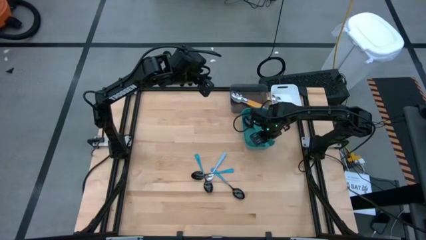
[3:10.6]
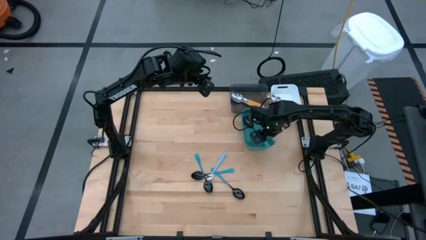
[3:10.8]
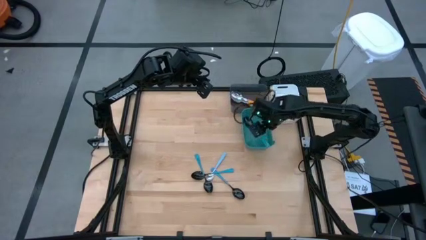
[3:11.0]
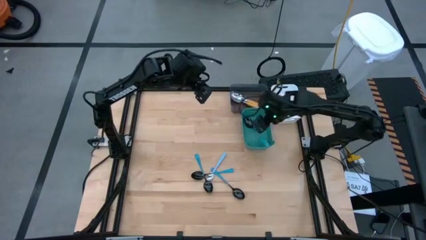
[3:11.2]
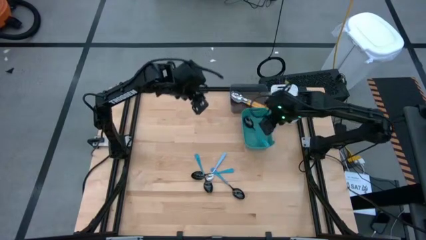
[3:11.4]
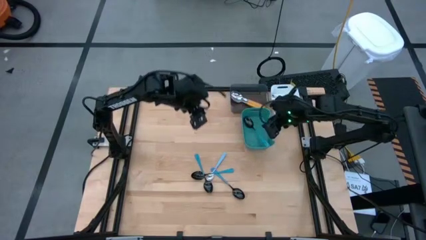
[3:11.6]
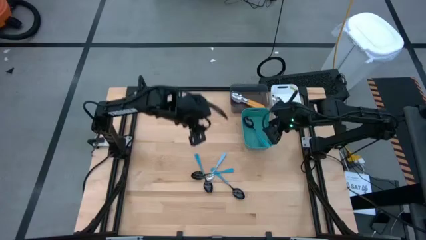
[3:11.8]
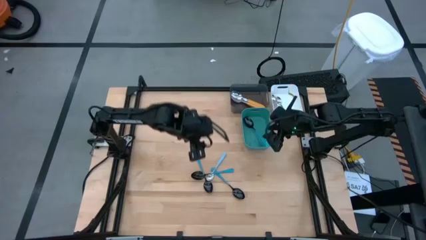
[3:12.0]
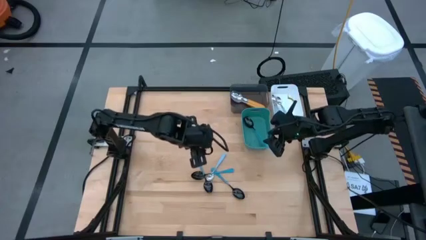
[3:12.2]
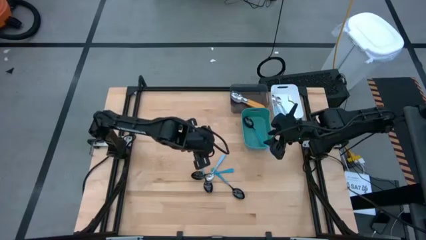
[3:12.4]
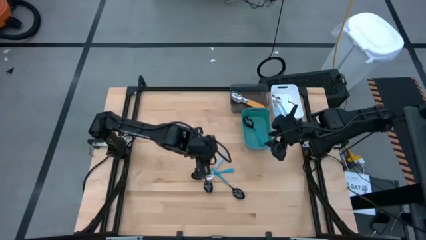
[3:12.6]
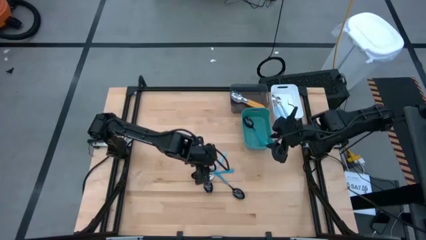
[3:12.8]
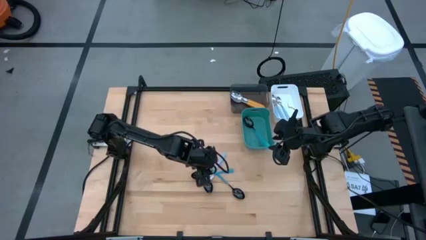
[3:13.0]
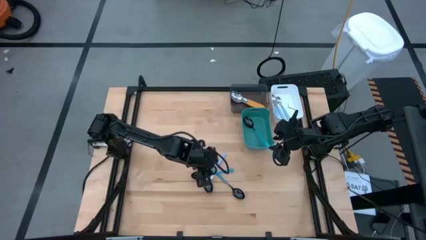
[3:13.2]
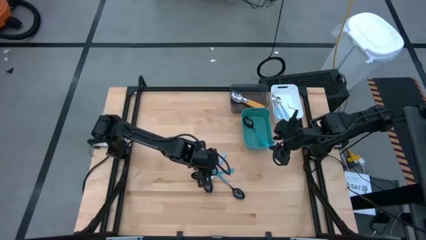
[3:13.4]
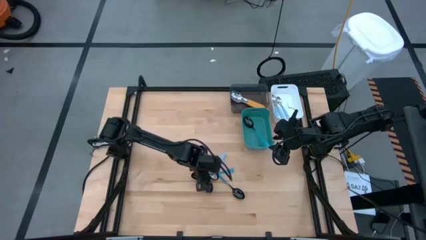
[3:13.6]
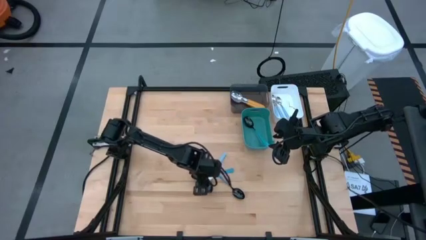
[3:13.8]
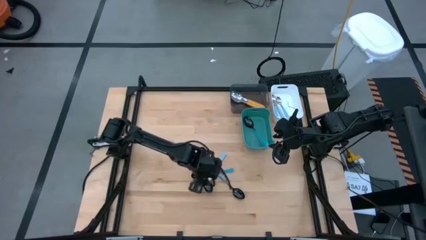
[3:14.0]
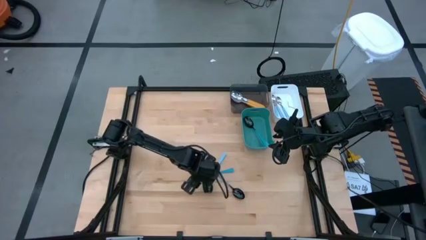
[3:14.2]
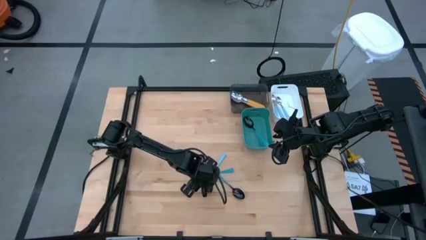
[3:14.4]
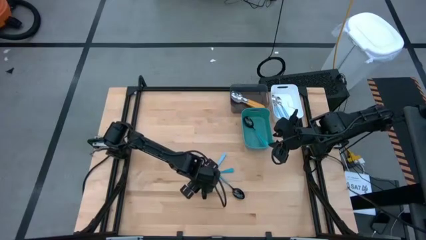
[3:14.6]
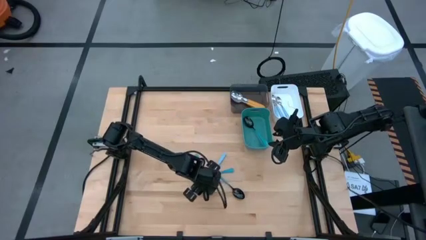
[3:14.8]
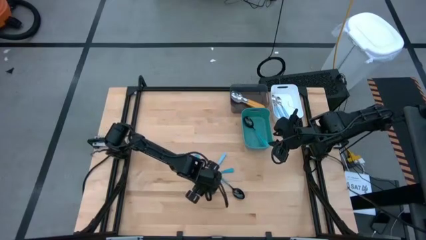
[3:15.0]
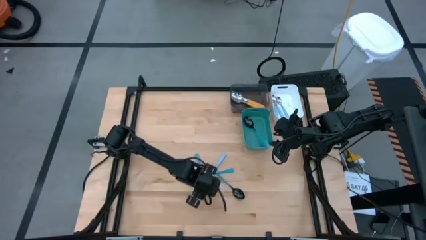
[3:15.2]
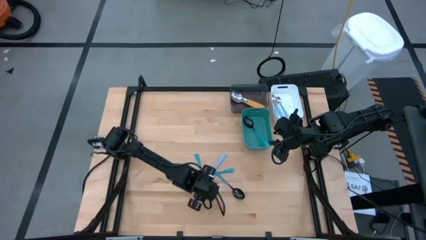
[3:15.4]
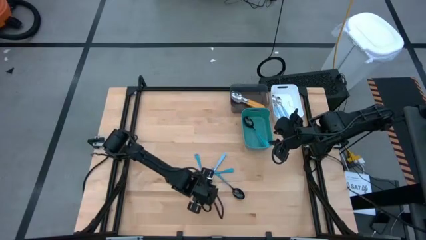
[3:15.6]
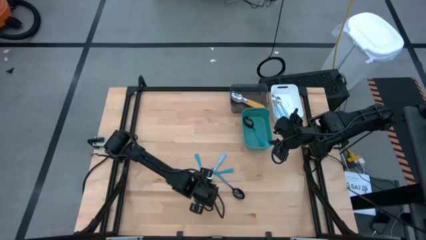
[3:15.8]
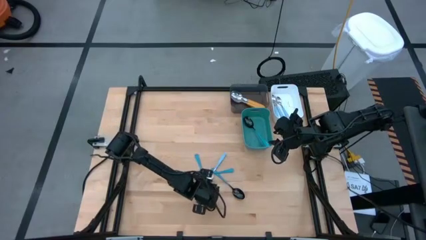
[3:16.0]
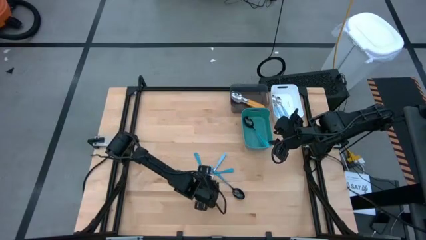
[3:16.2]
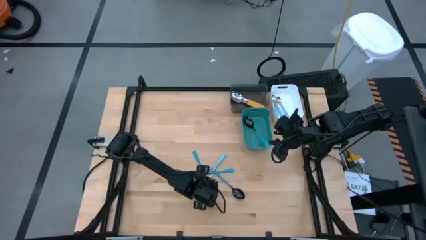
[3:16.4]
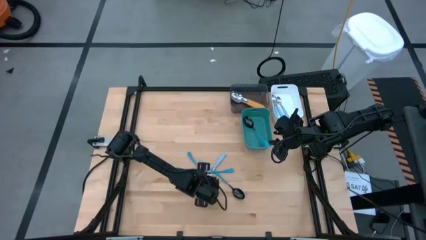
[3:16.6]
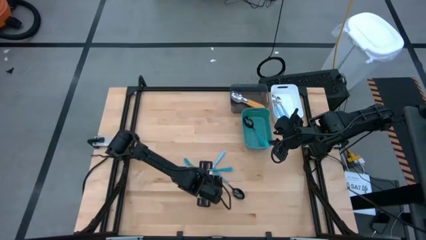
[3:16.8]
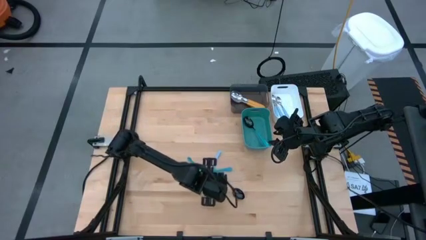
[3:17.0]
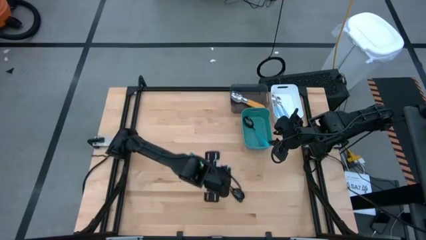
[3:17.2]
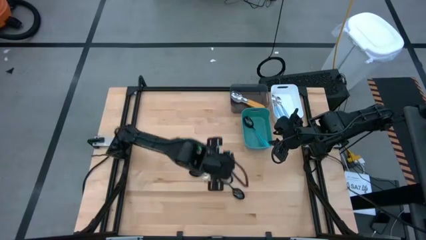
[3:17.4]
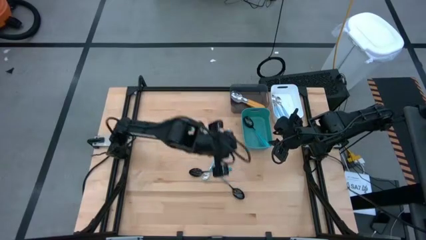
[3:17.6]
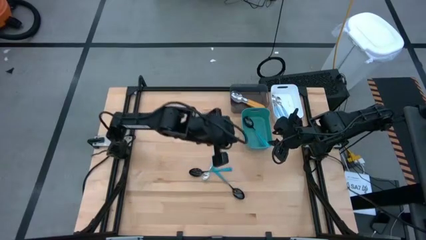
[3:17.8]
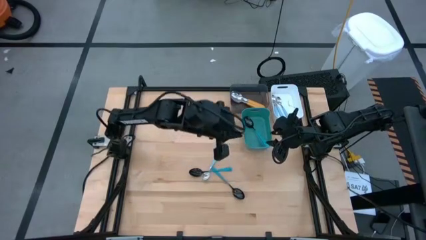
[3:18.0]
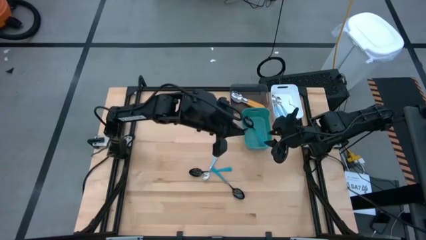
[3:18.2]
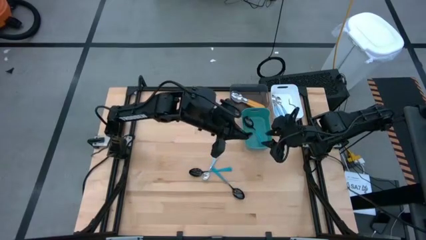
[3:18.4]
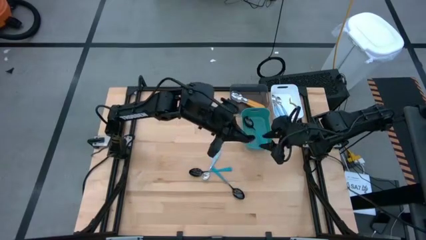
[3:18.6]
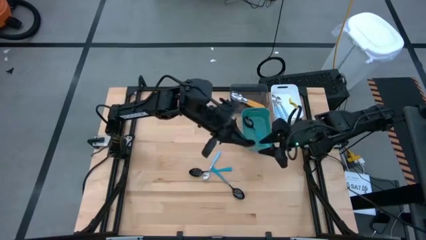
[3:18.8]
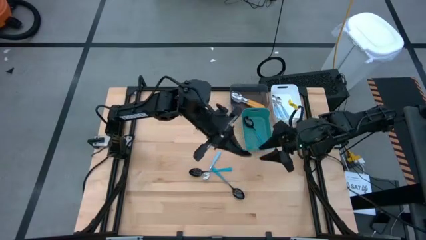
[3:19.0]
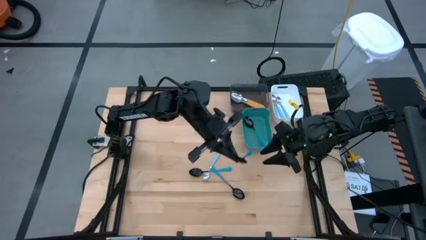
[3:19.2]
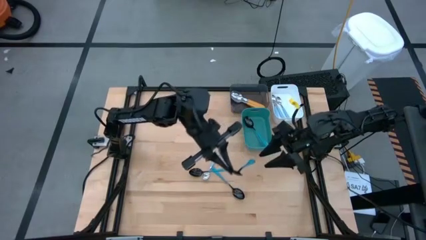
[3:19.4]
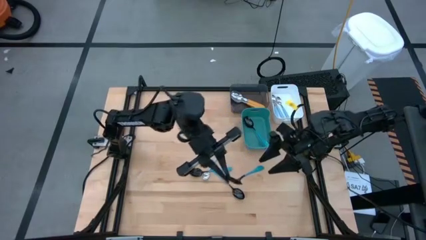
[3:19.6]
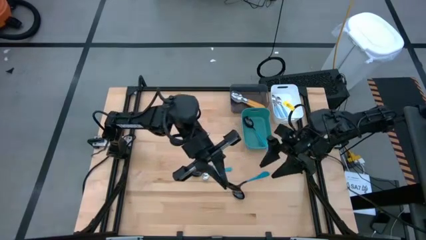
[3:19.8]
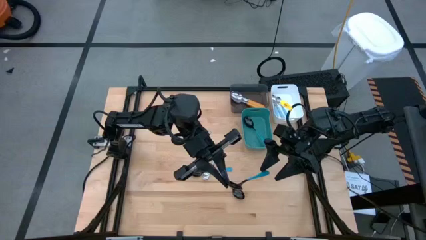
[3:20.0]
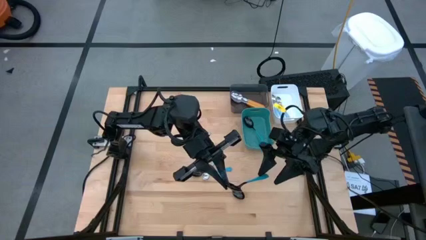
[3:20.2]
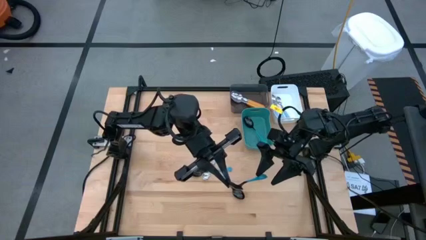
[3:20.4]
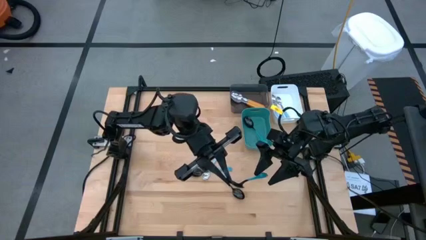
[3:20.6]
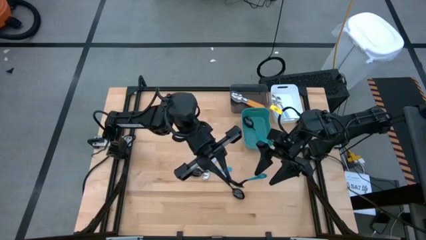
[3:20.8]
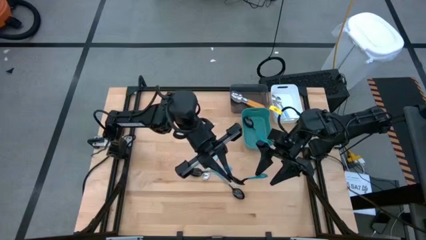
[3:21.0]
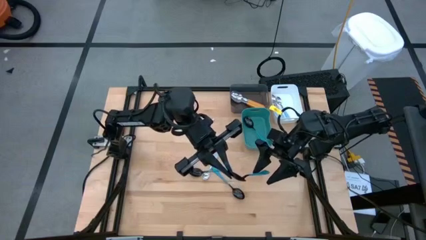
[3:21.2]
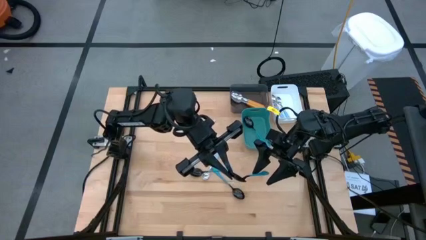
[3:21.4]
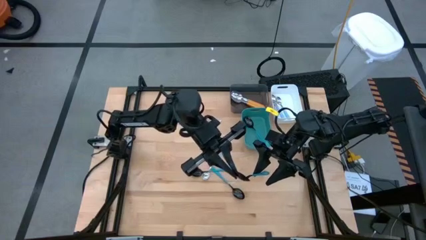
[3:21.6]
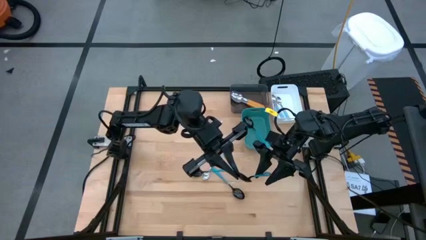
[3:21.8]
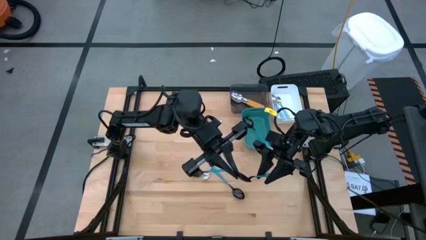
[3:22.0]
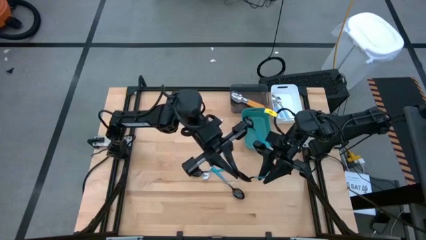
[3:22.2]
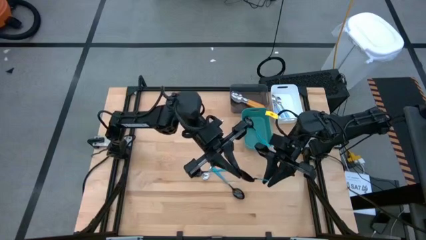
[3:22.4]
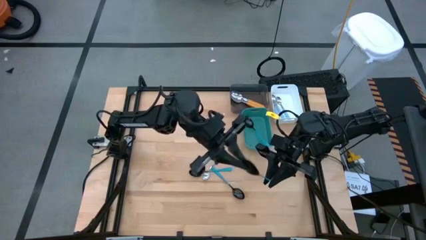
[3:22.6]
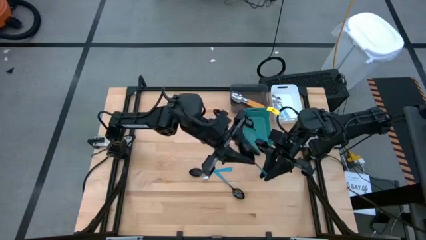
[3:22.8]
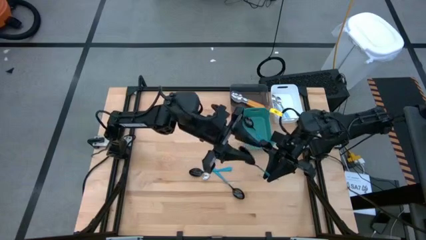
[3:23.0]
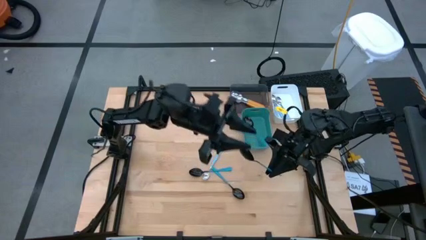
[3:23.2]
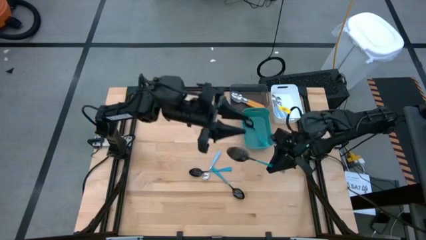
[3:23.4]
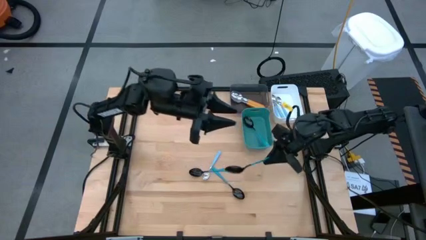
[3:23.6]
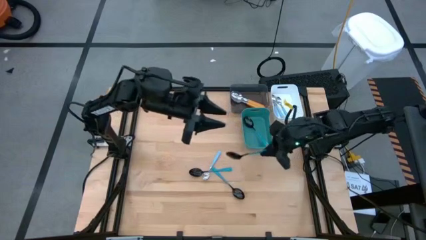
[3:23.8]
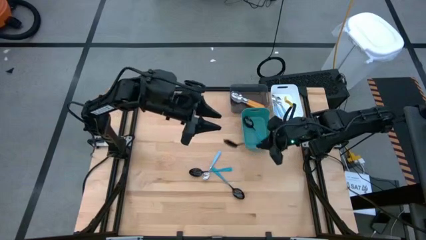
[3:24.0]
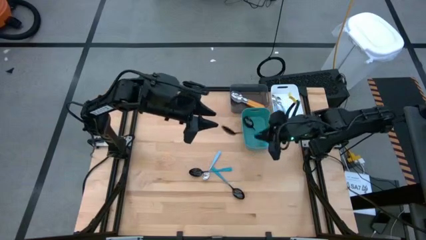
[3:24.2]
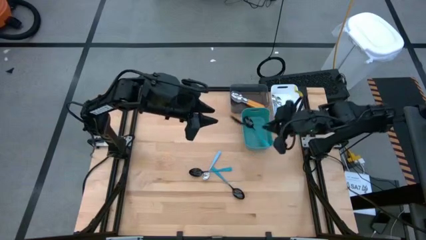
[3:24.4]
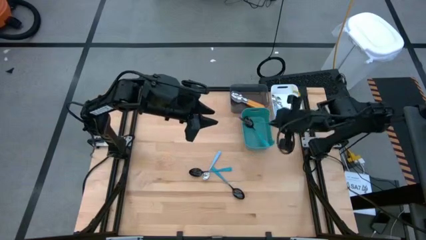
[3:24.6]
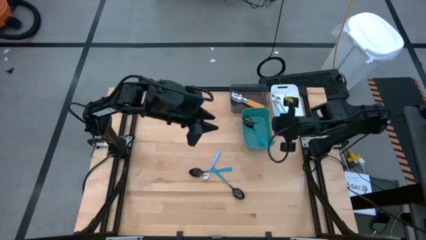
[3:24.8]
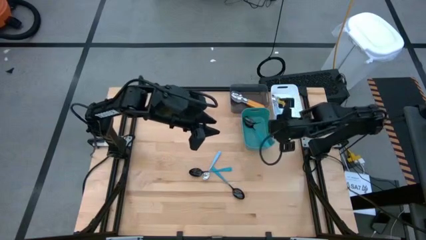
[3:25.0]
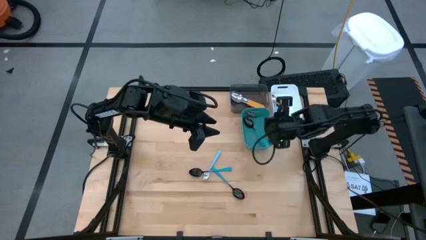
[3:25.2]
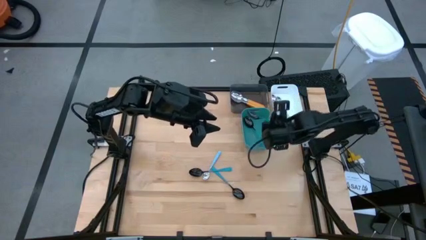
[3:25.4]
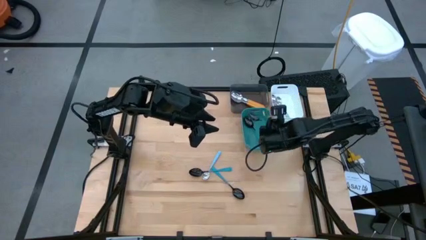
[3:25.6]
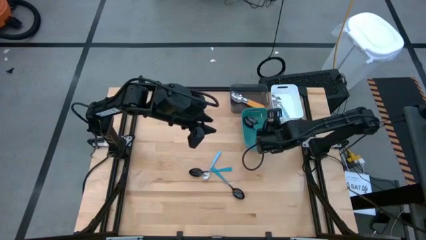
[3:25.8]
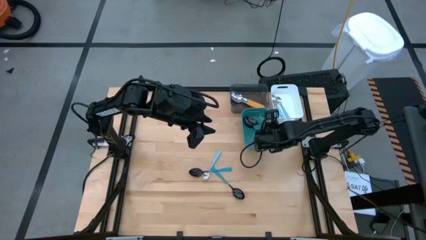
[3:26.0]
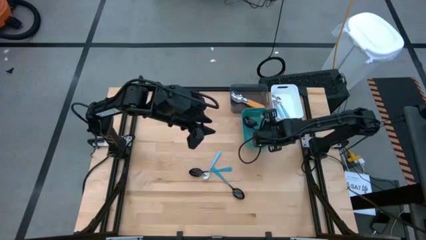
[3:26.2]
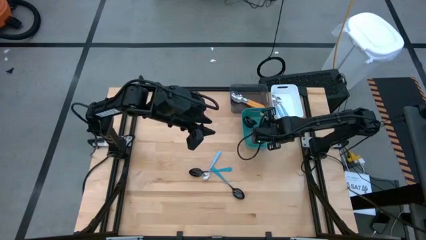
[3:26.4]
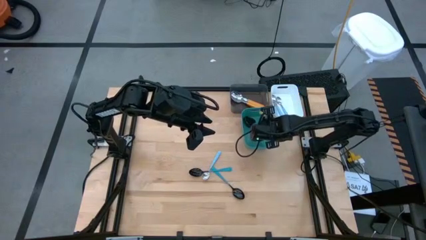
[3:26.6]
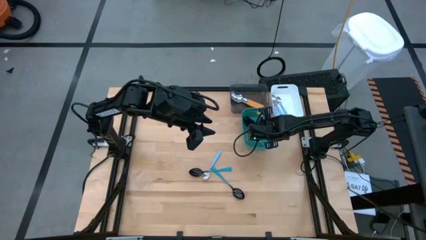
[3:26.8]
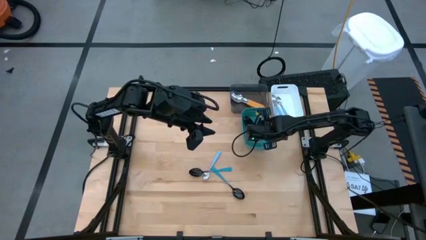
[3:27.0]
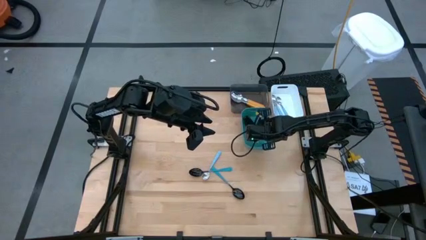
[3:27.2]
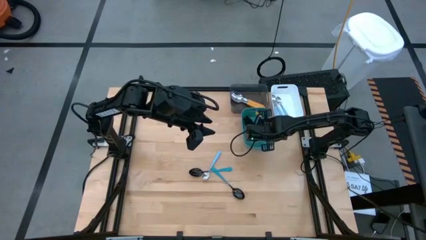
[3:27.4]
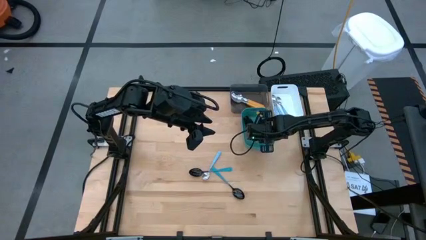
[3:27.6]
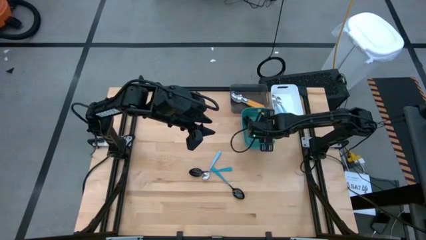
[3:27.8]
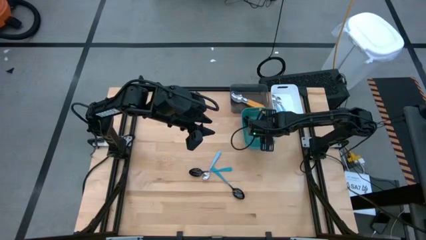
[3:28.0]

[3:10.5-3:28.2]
Task: Sort silverware by color (type)
Put the blue spoon into the green bin
